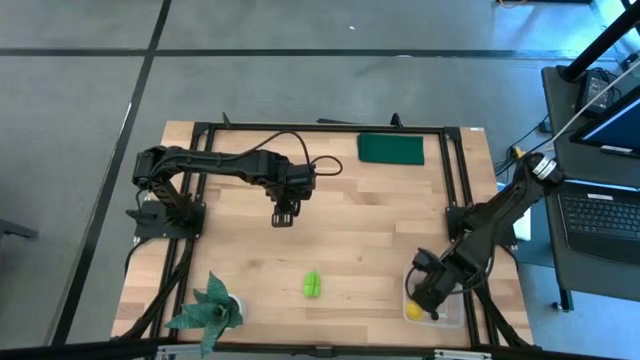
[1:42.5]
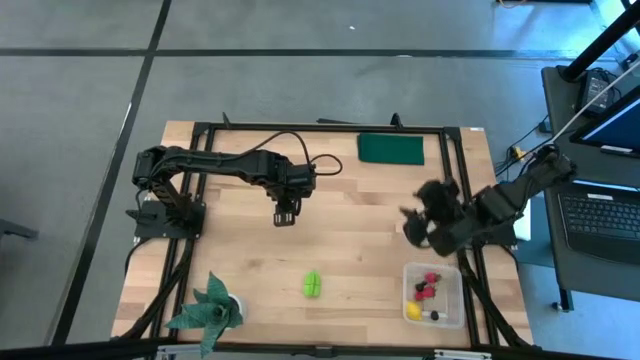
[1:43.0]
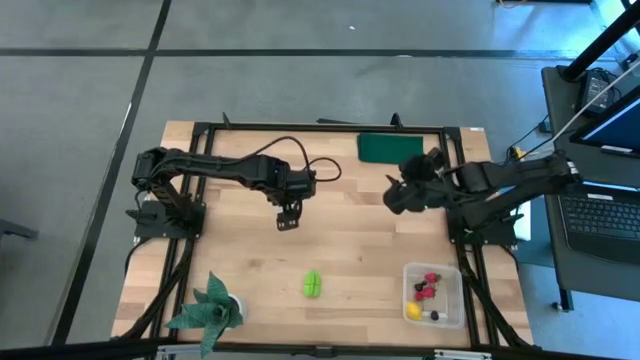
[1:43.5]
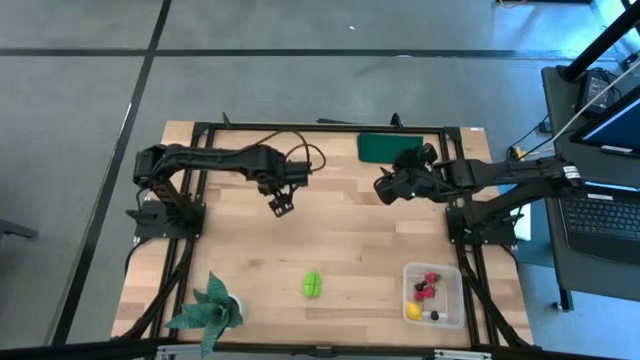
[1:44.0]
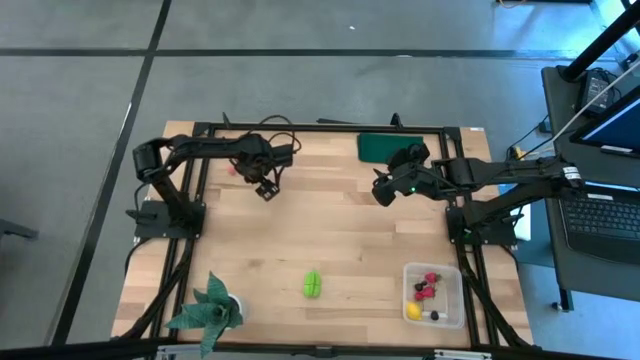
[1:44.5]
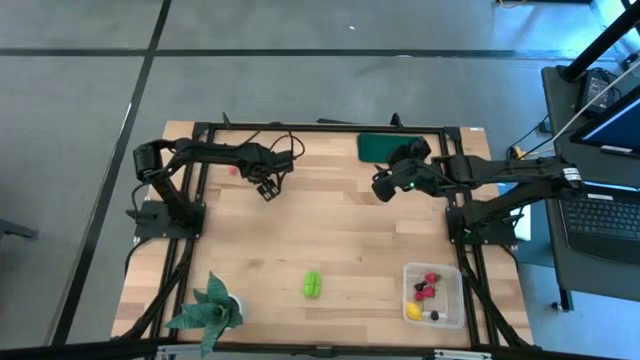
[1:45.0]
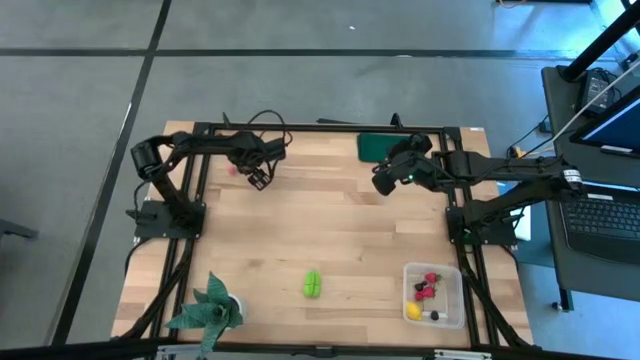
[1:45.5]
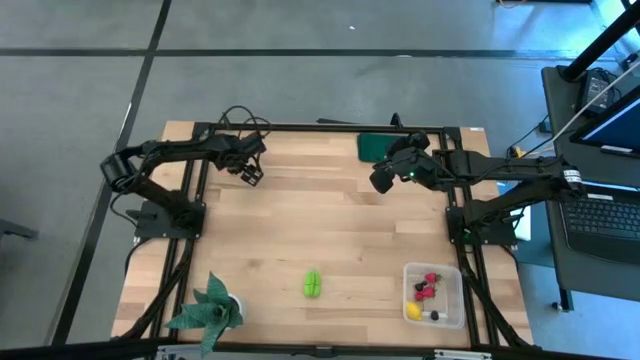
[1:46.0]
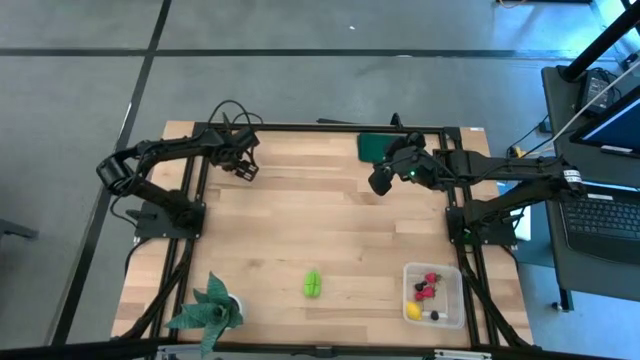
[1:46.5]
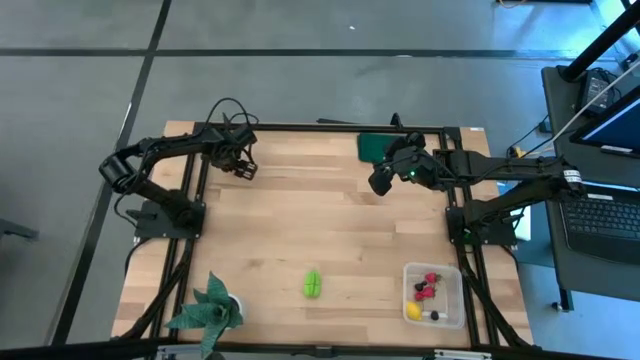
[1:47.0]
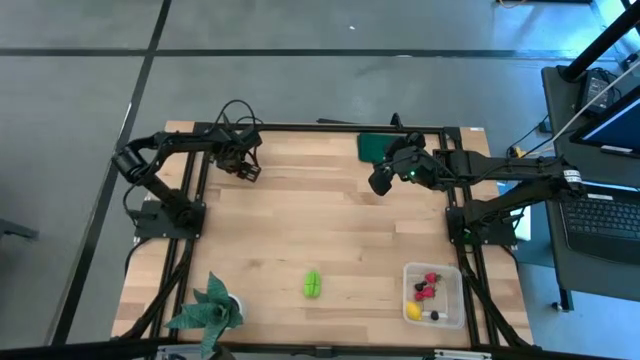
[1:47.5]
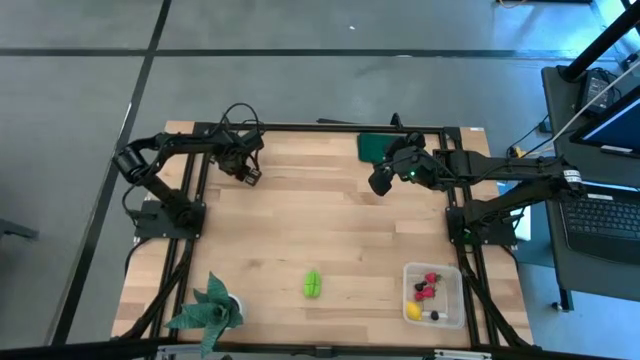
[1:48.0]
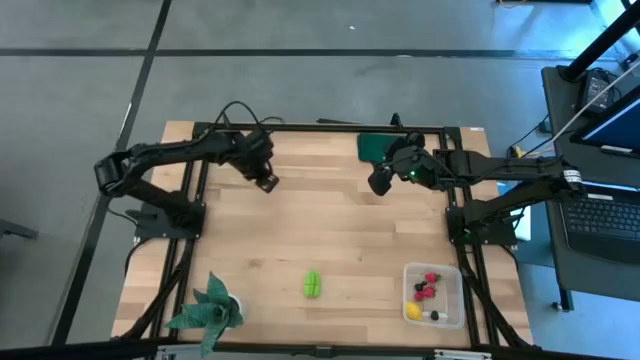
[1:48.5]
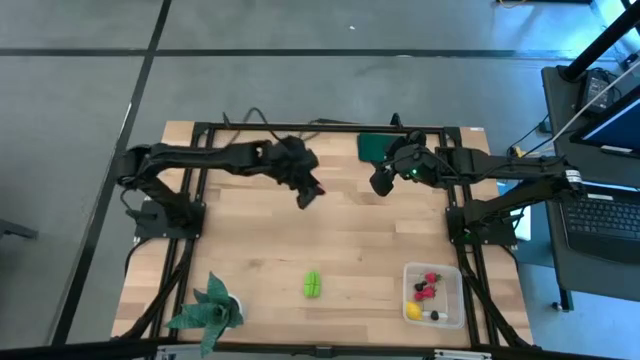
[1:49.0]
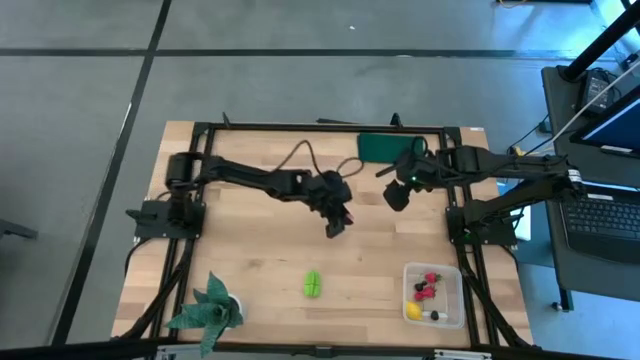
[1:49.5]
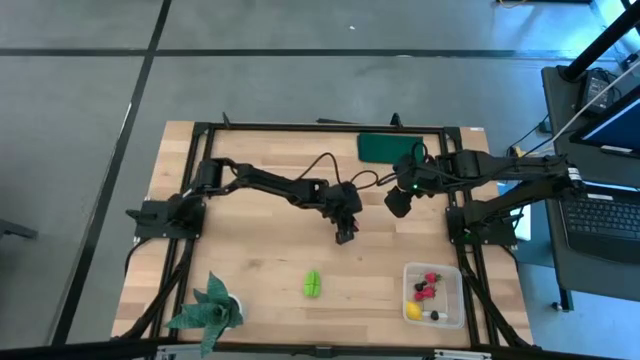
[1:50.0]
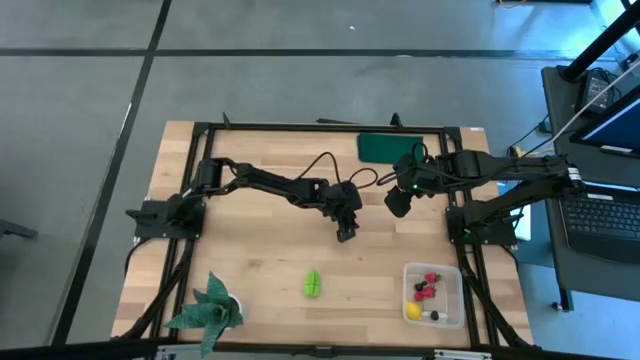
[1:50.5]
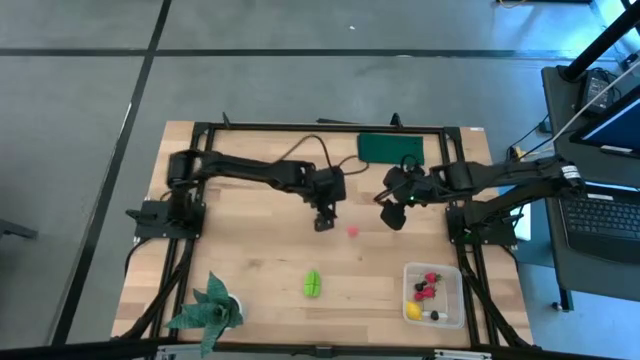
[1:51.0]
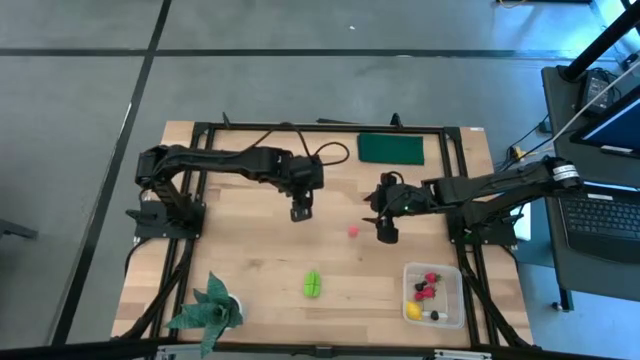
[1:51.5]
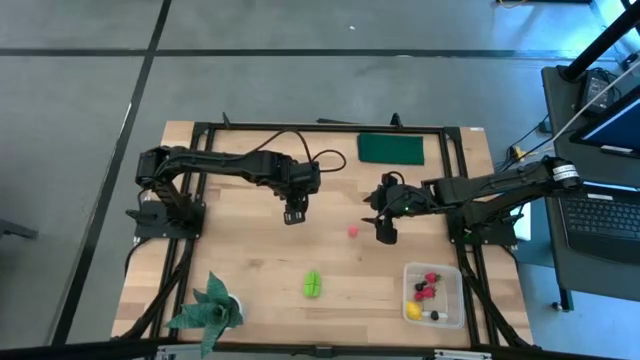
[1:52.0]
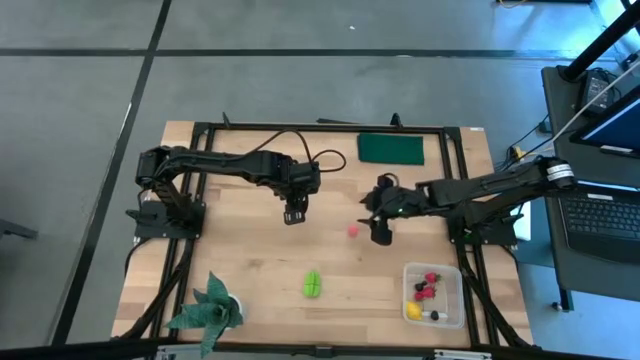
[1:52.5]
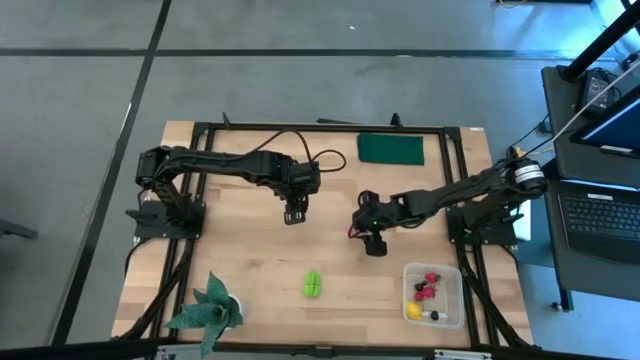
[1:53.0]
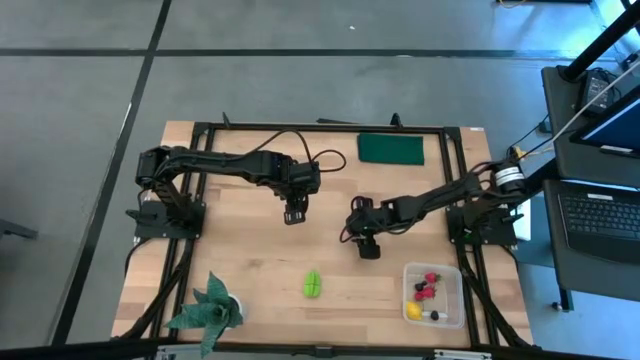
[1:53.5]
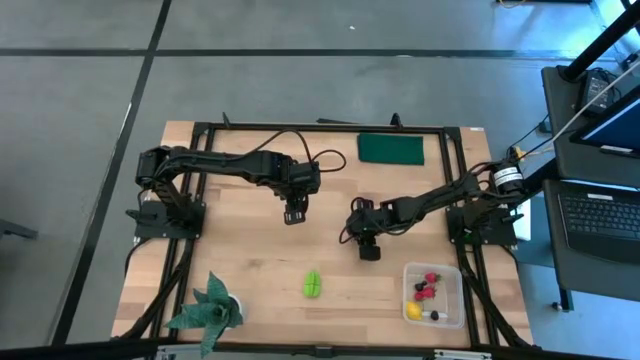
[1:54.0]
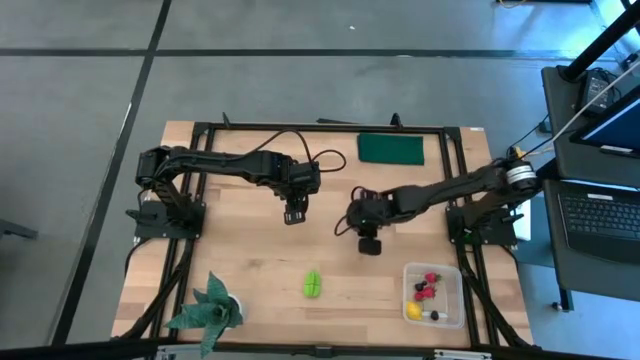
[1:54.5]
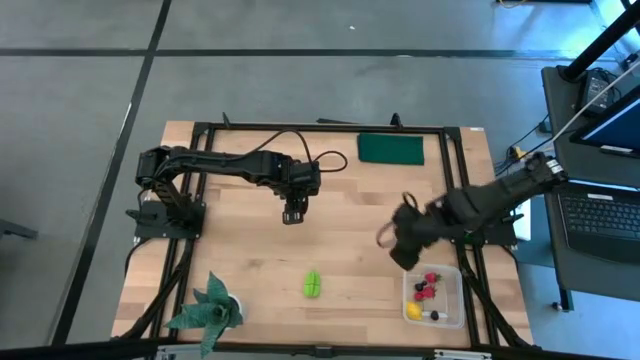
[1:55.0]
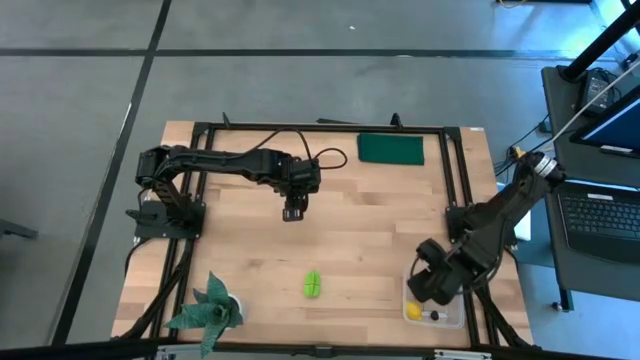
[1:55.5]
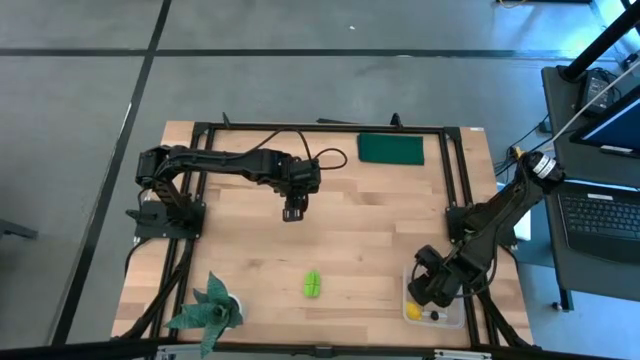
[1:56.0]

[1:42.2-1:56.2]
Task: Pick and placing Produce into tupperware
Put the pink peach into the transparent bin

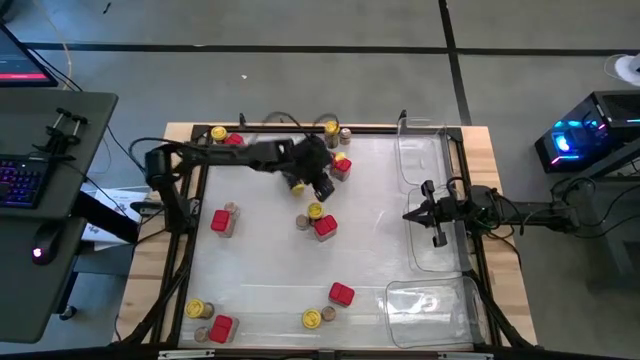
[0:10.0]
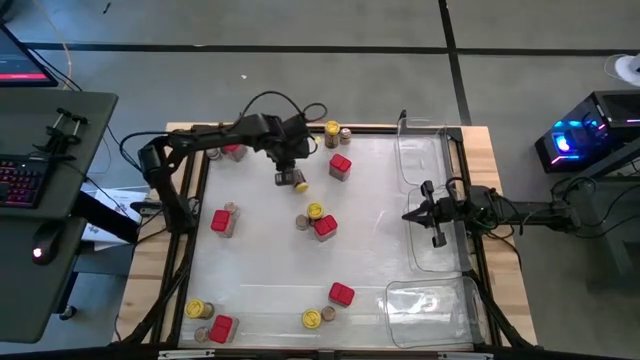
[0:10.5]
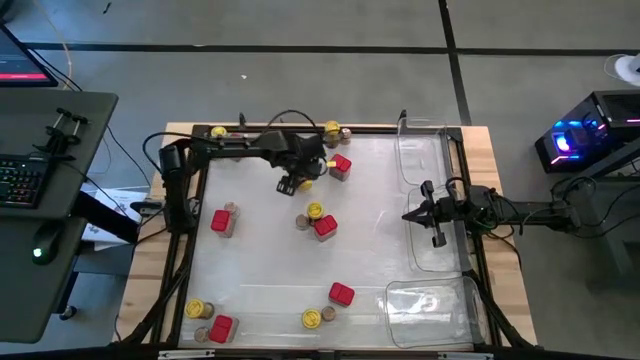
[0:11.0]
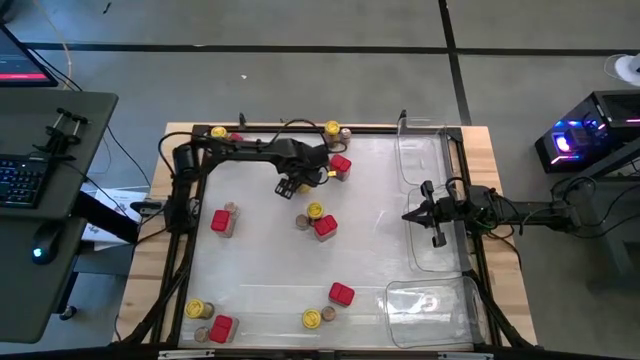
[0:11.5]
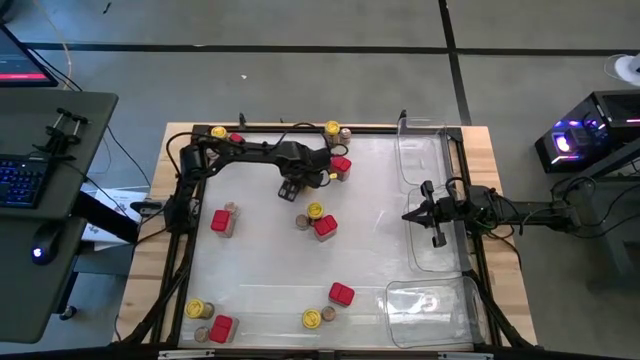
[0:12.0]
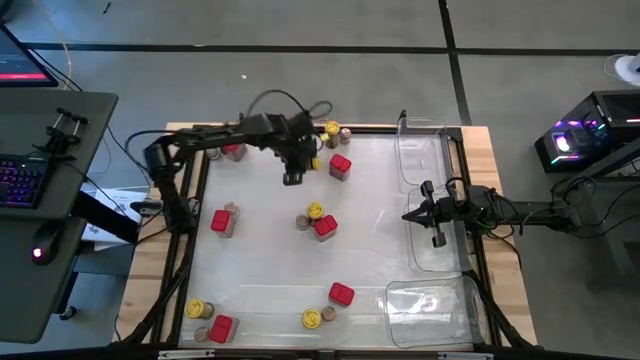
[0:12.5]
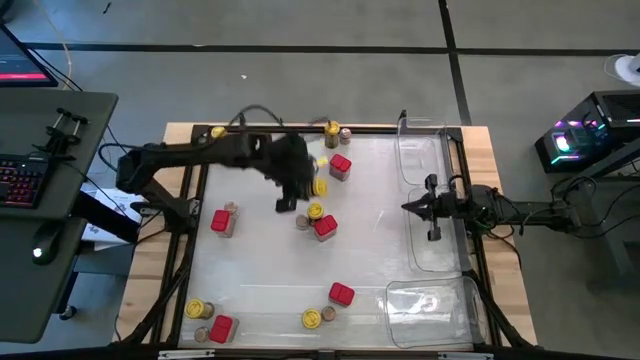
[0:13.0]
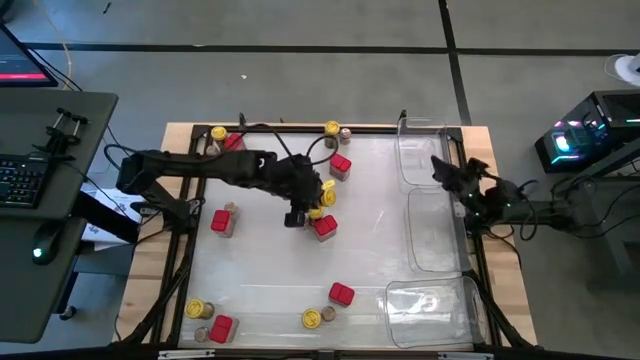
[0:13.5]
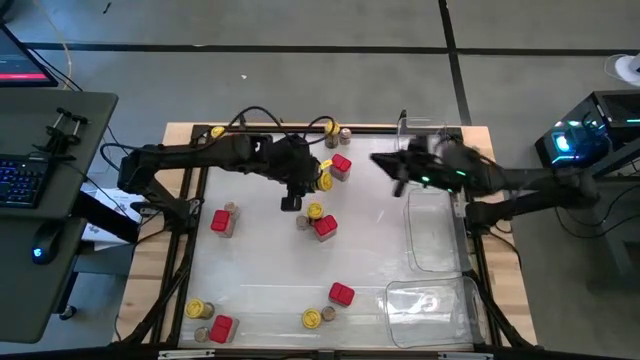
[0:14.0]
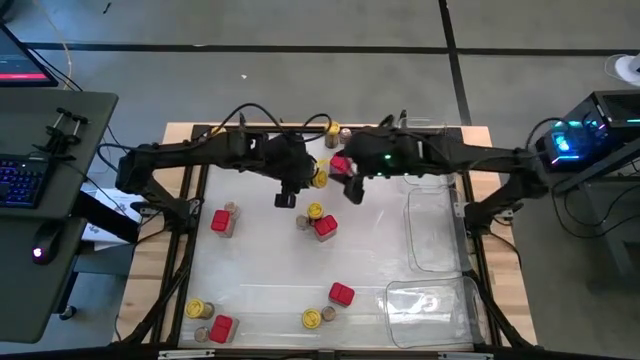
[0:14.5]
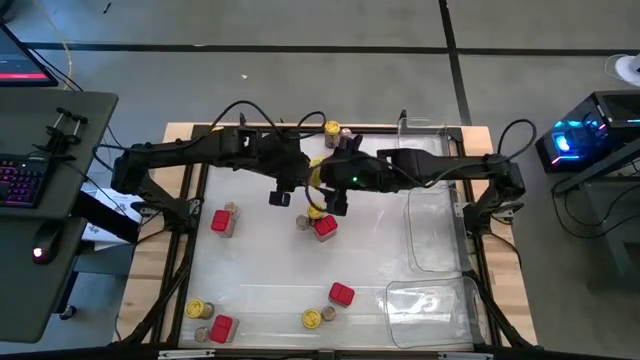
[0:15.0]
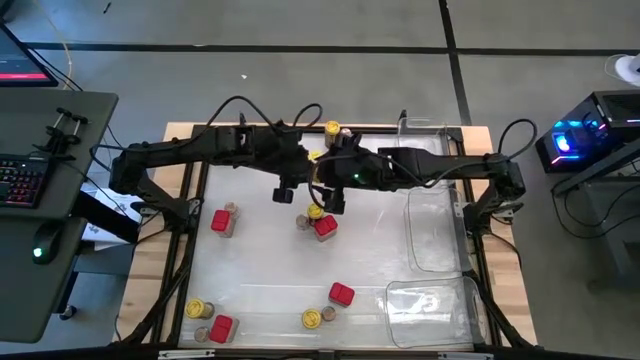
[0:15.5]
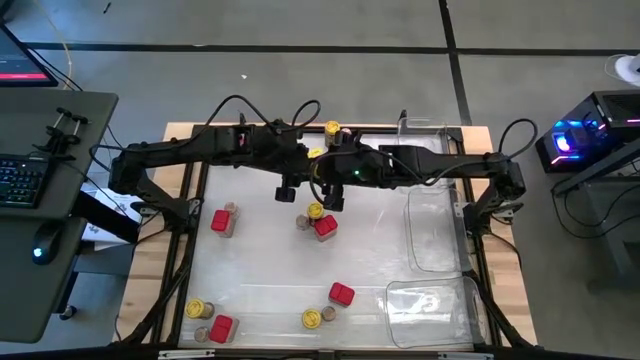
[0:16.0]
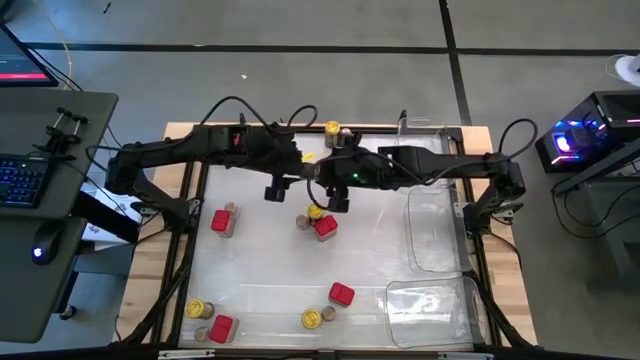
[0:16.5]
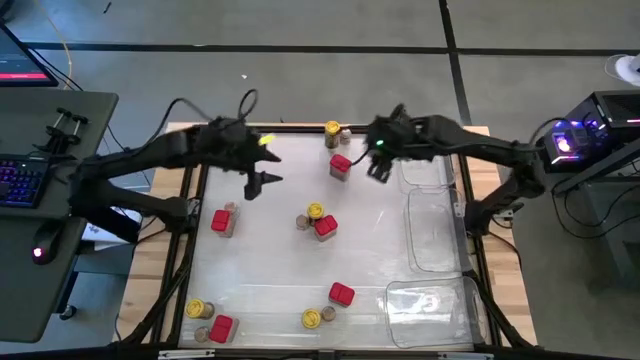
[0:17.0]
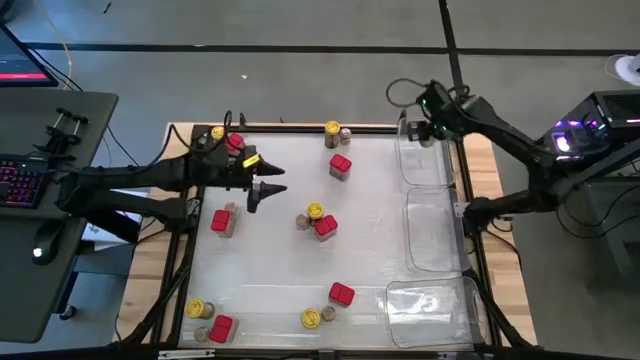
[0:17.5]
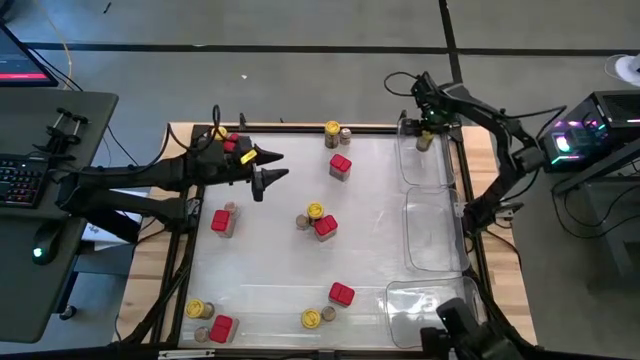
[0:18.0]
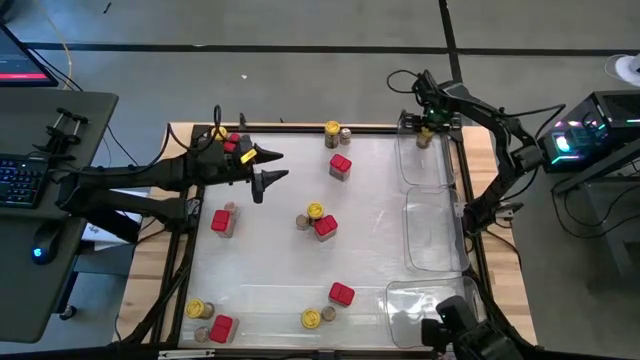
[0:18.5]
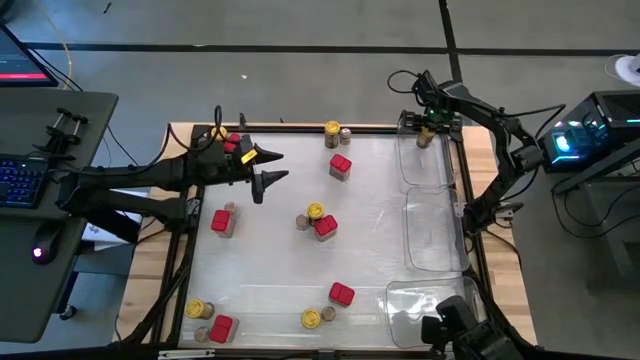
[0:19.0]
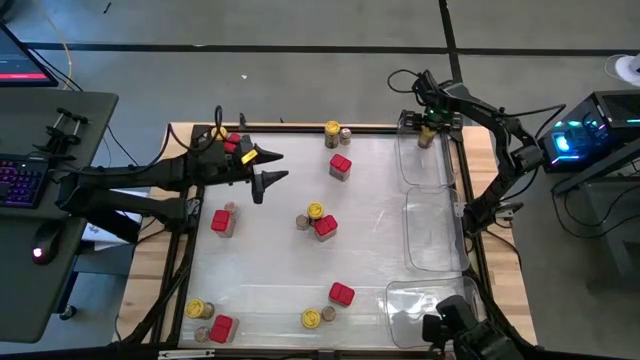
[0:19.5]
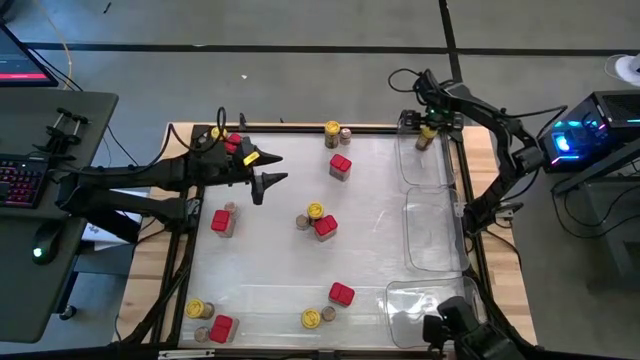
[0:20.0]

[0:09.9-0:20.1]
Task: Sort spices by type
Put the yellow seasoning bottle into the top transparent bin
